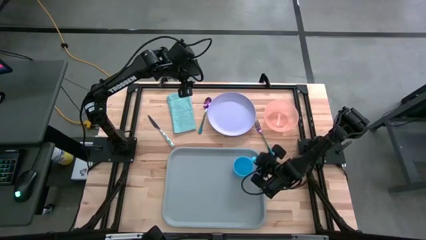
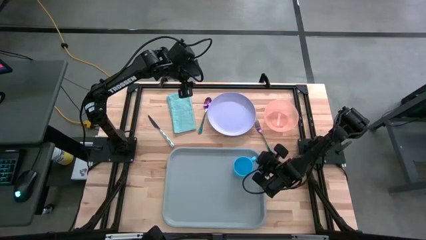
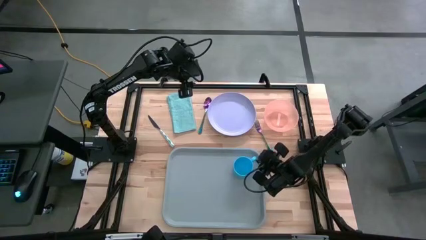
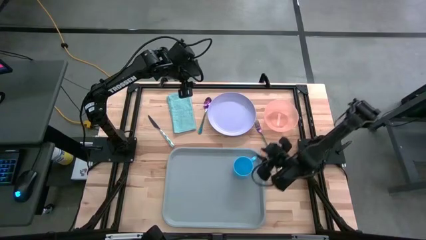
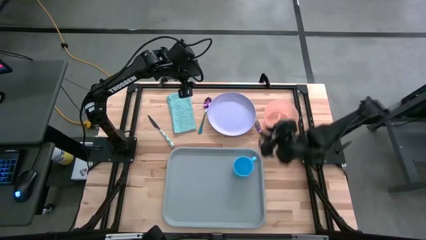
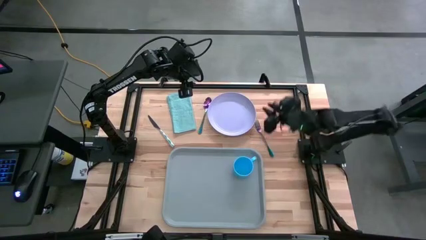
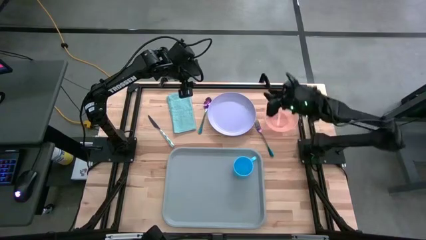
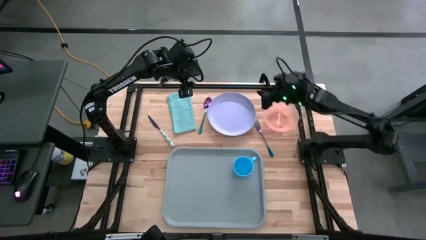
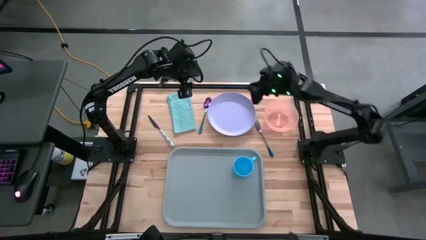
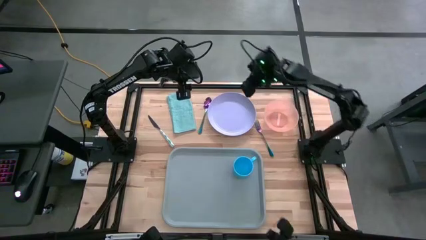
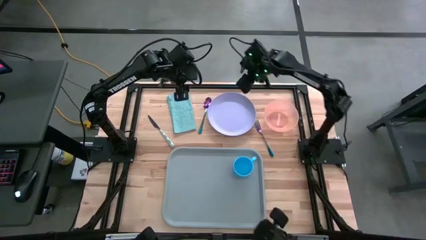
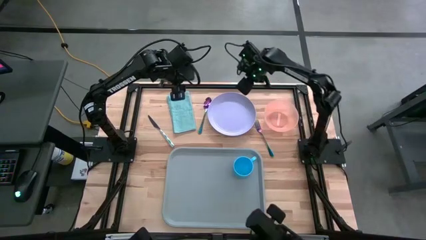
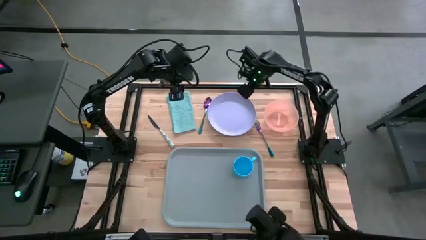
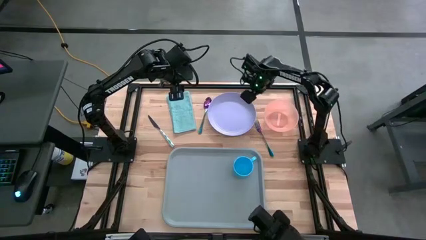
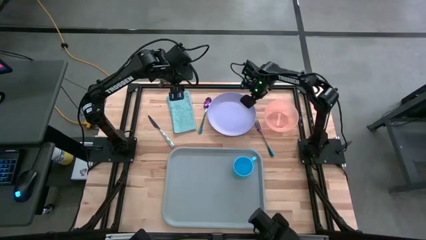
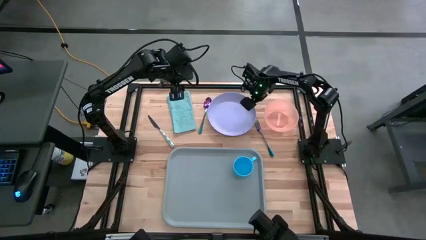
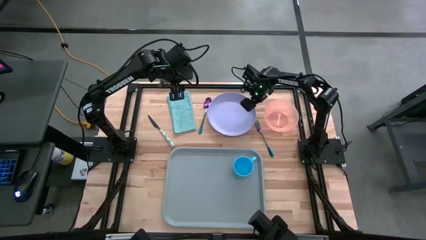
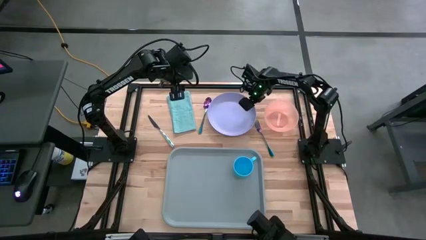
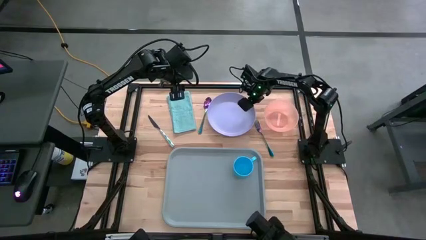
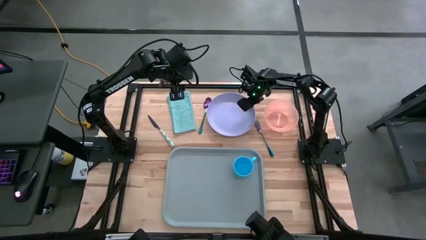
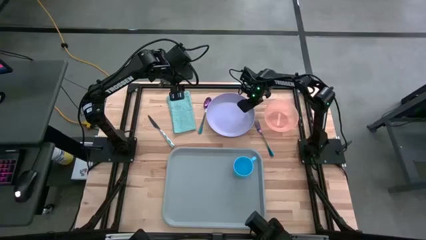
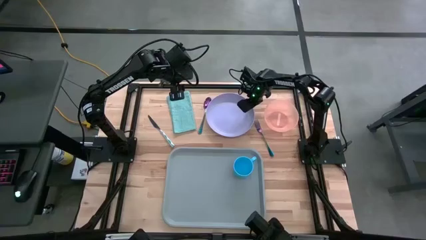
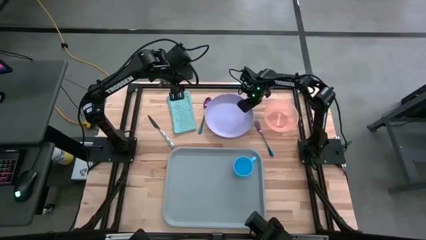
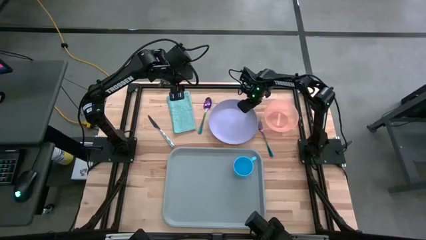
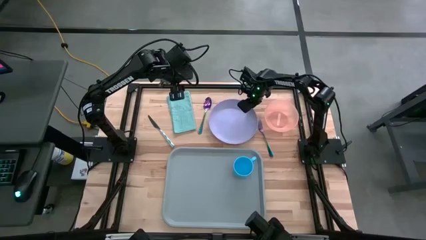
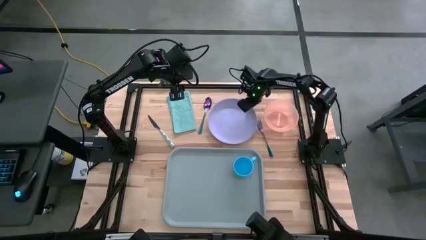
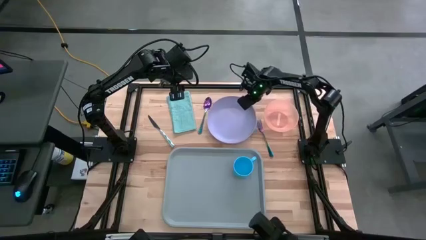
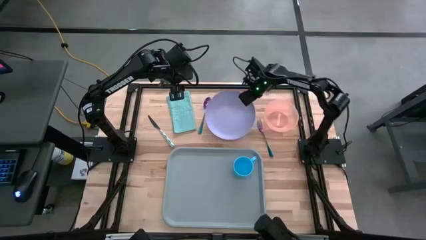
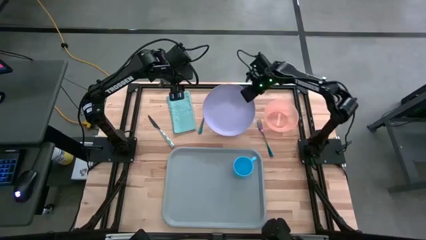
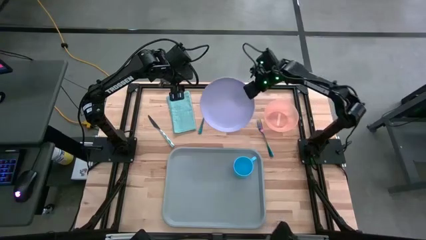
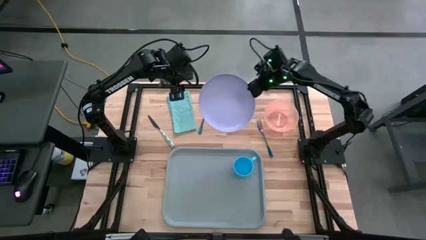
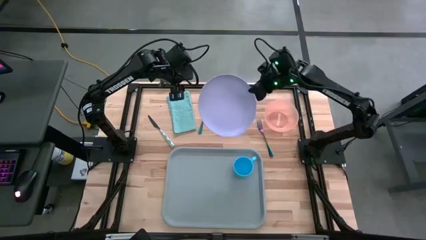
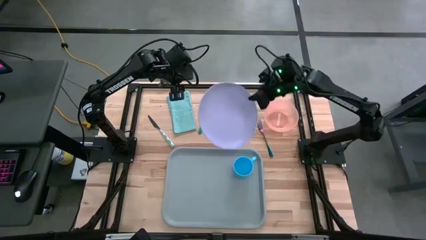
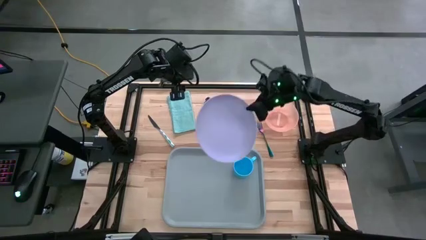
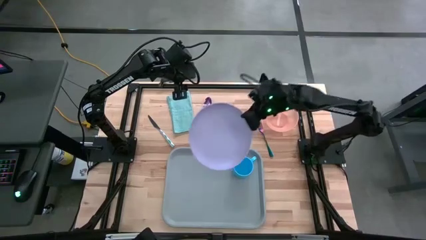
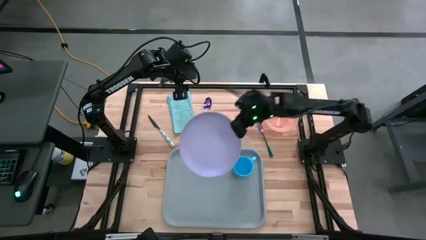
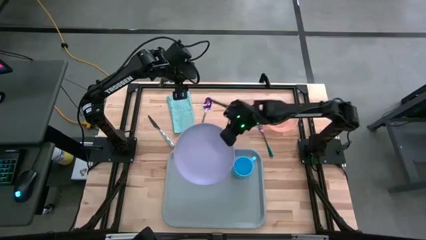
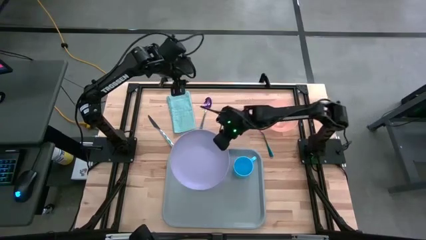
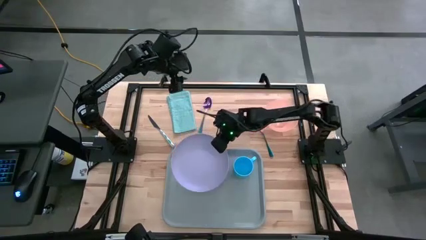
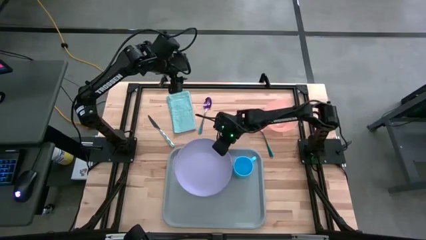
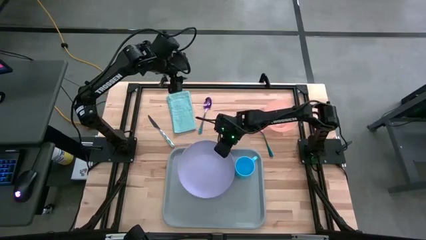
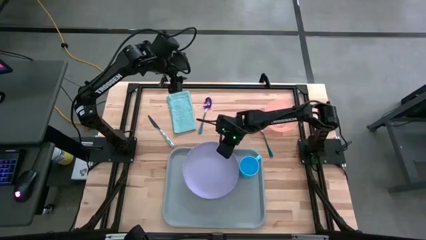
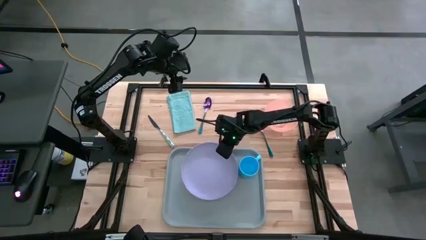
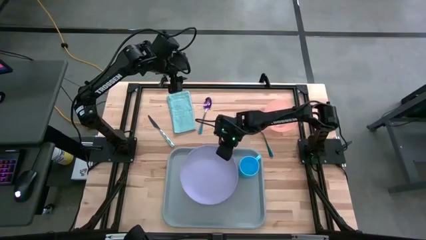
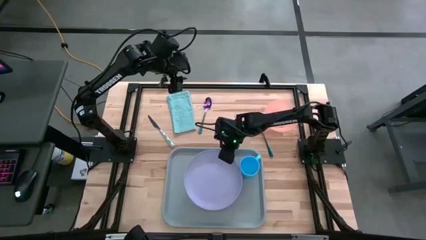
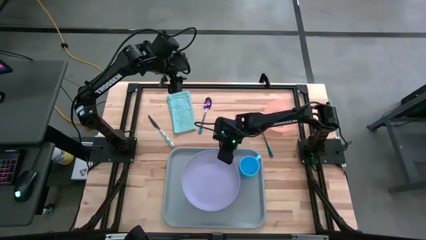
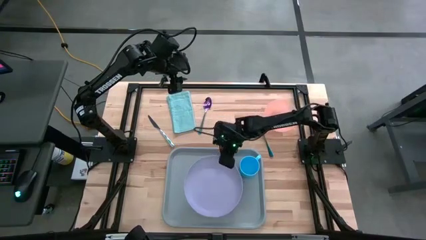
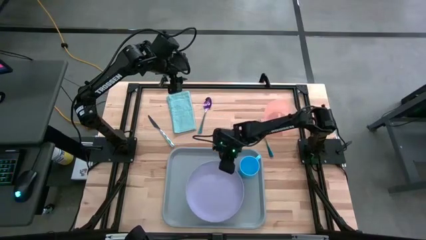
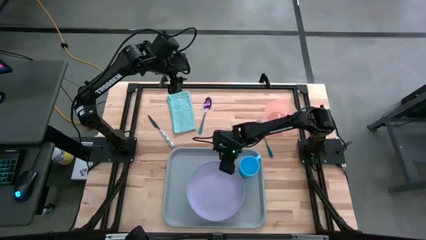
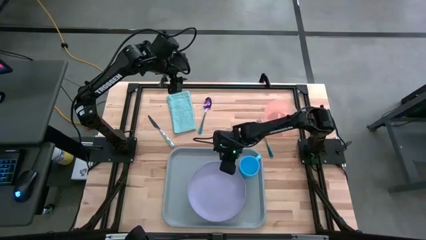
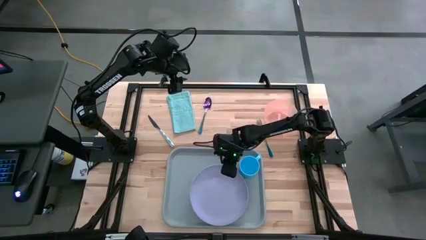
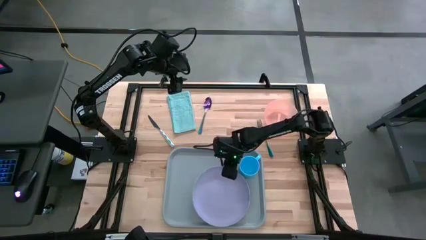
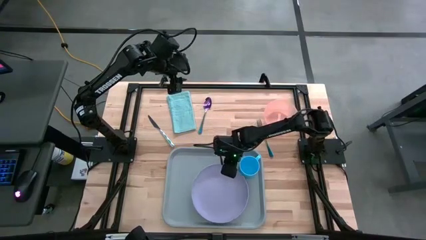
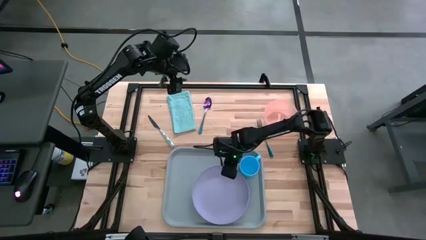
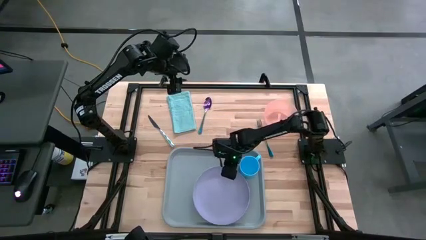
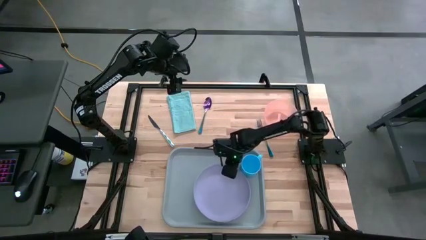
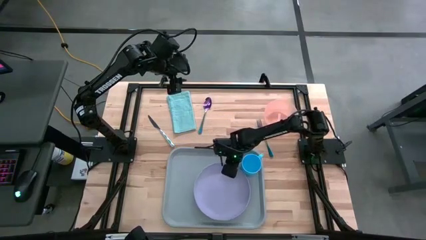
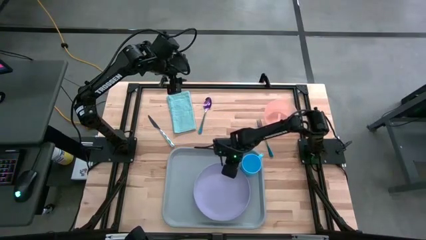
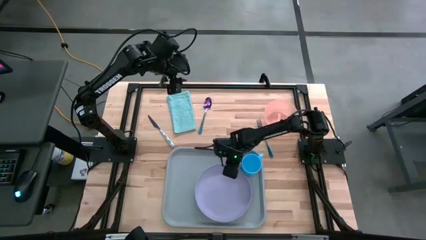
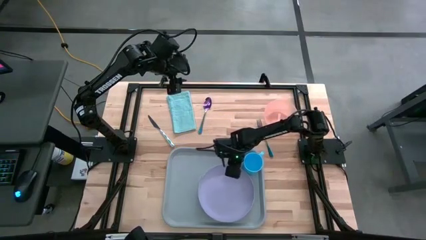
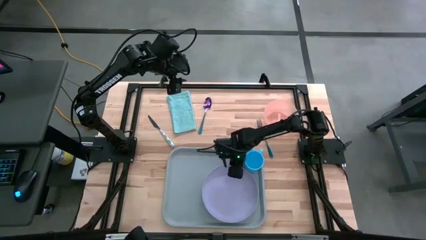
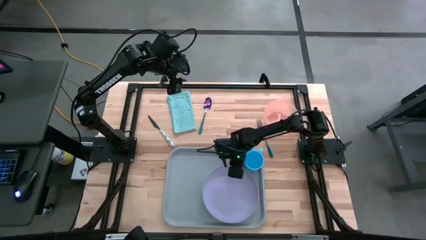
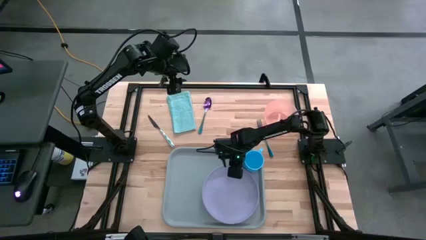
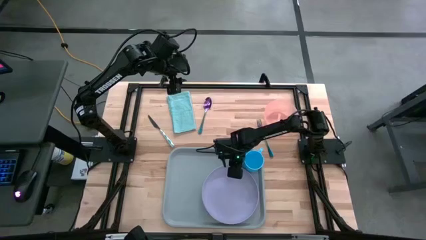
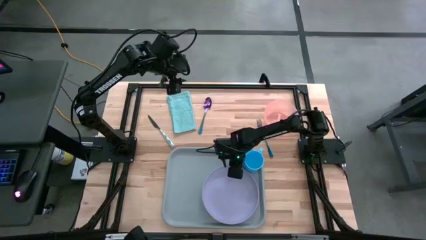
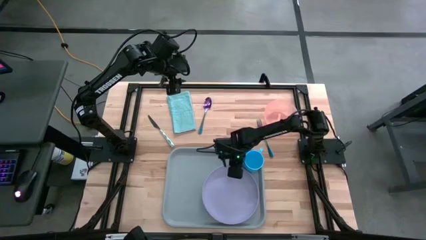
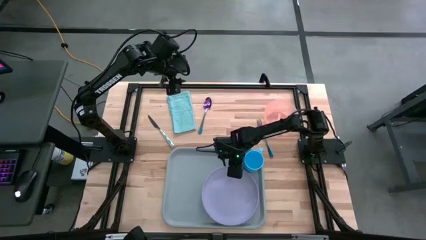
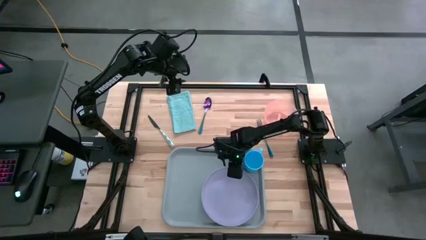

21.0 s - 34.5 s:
Task: Set up tray
Put the purple plate on the gray tray to the bottom of the blue mug
